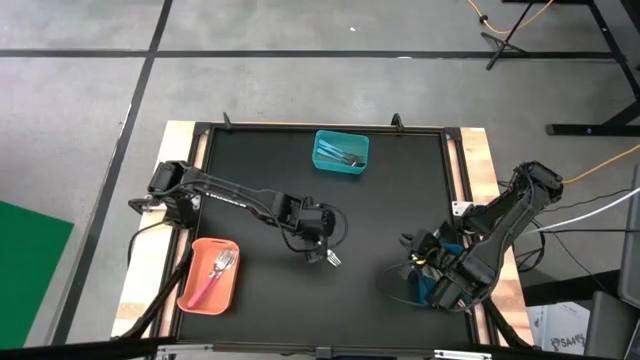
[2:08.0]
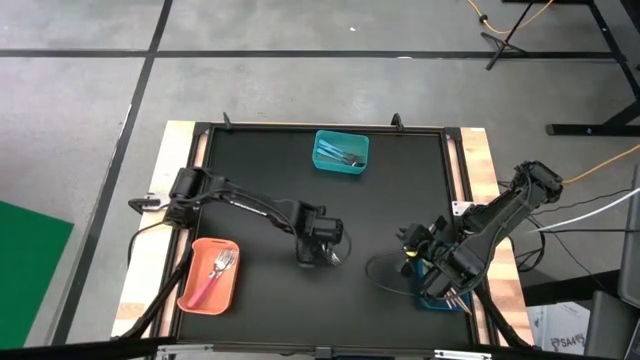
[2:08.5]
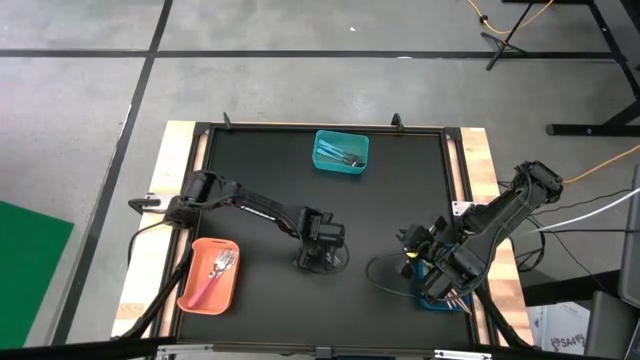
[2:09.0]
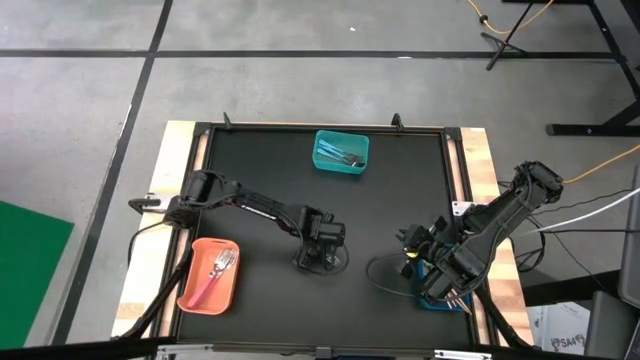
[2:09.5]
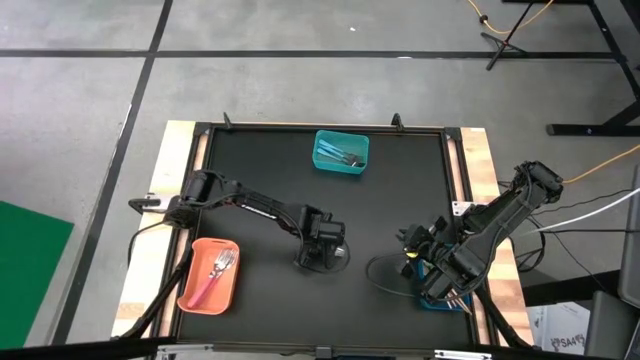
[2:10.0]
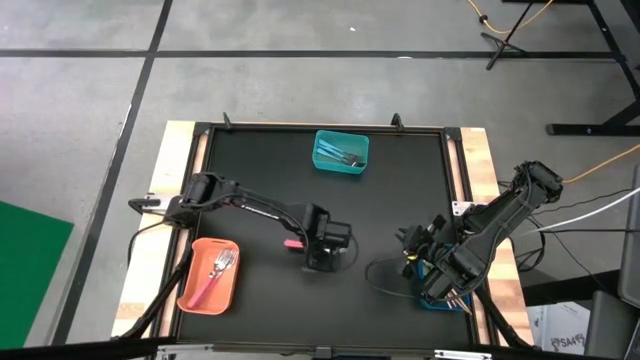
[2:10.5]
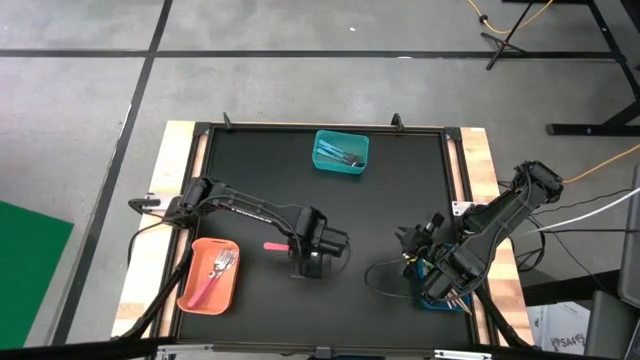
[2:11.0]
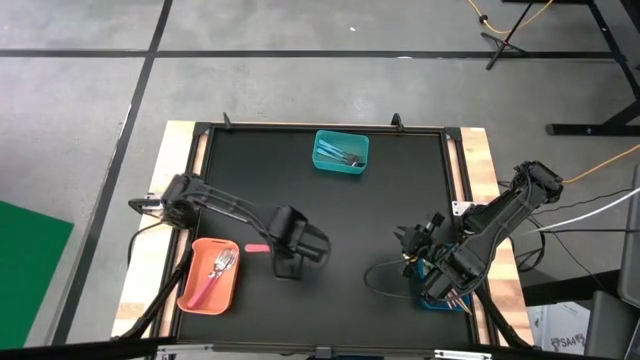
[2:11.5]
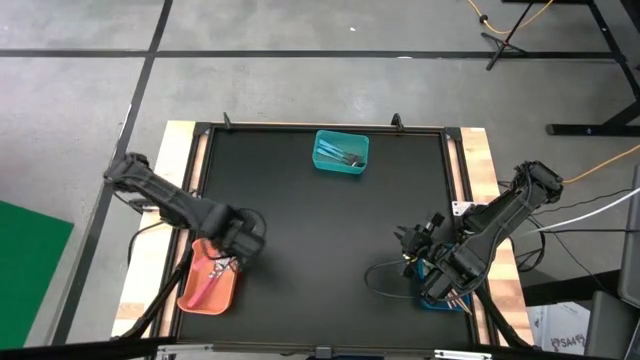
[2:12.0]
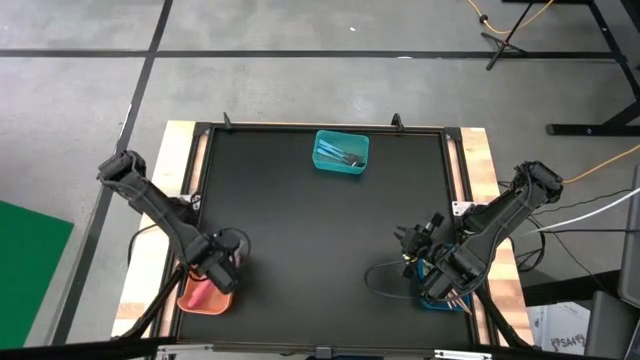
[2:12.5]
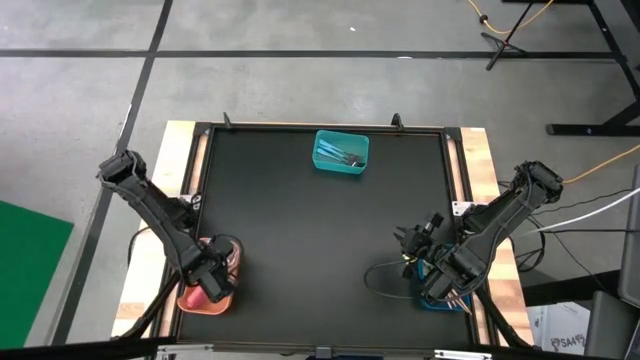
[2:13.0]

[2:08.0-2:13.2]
Task: Sort silverware by color (type)
Put the pink fork into the orange bin

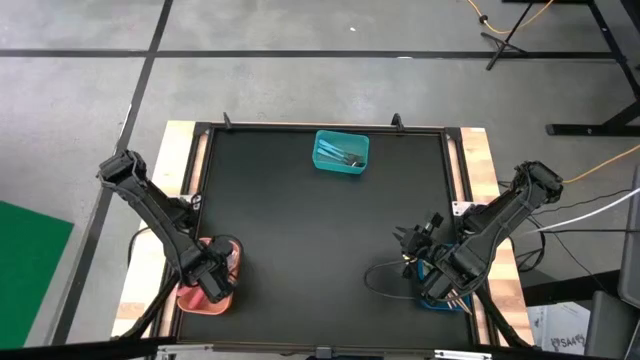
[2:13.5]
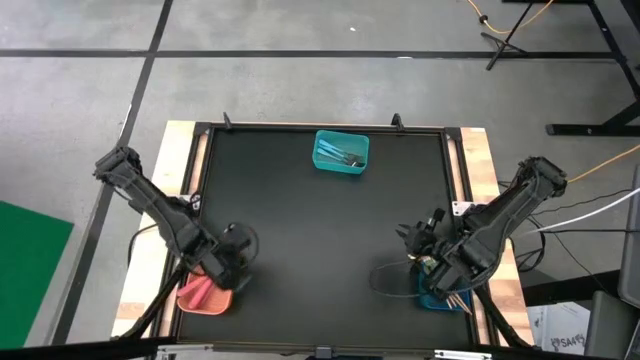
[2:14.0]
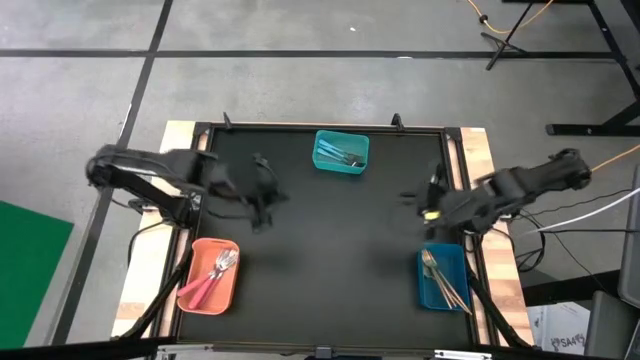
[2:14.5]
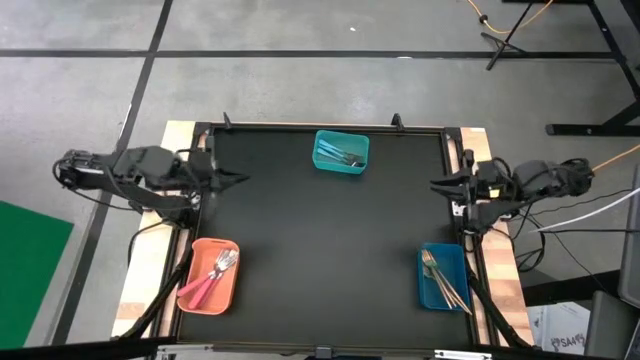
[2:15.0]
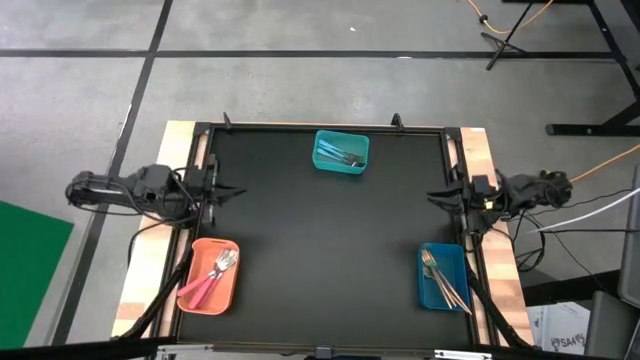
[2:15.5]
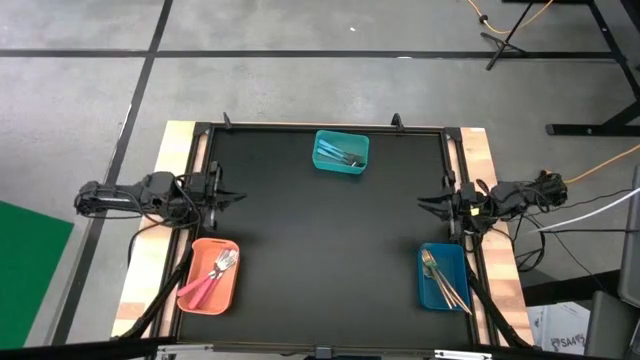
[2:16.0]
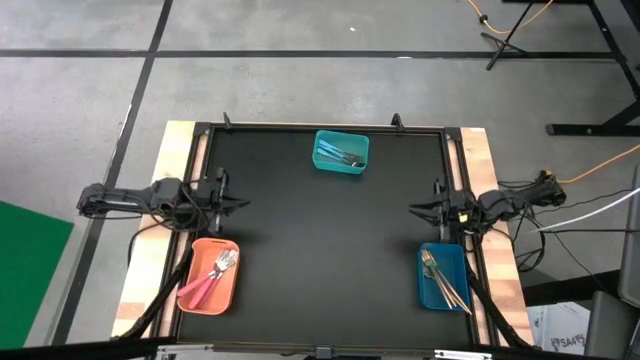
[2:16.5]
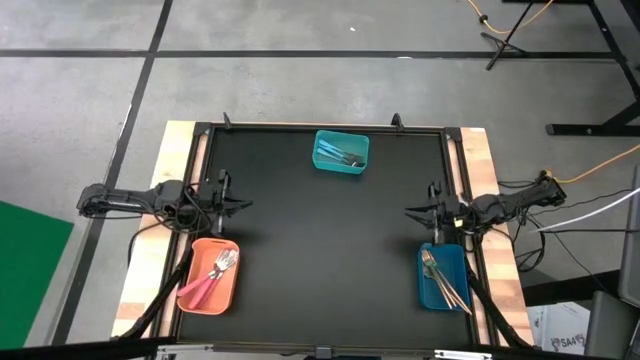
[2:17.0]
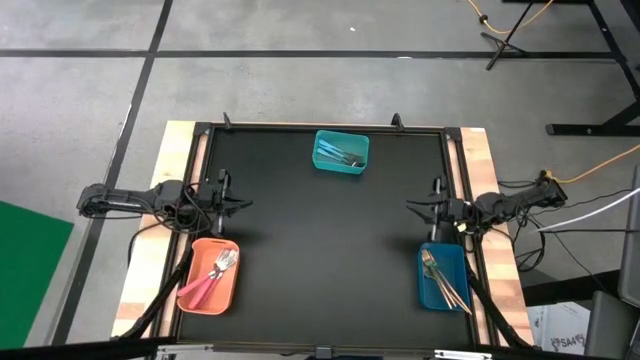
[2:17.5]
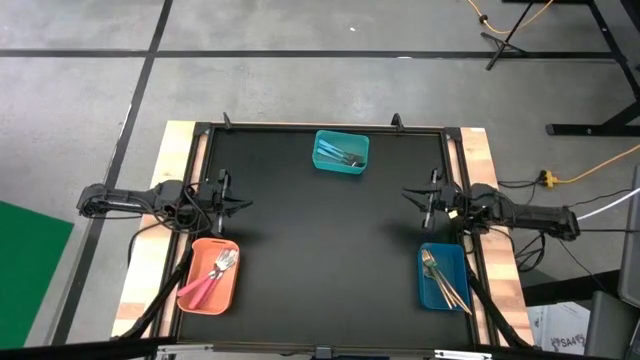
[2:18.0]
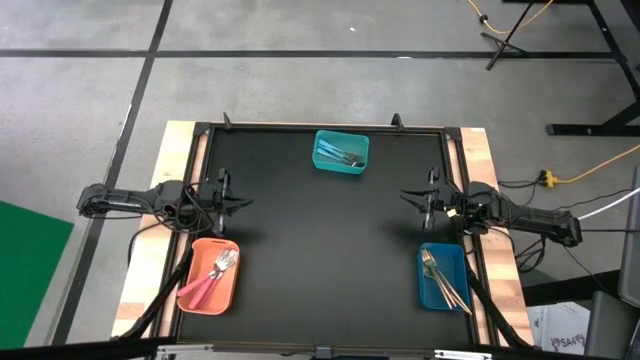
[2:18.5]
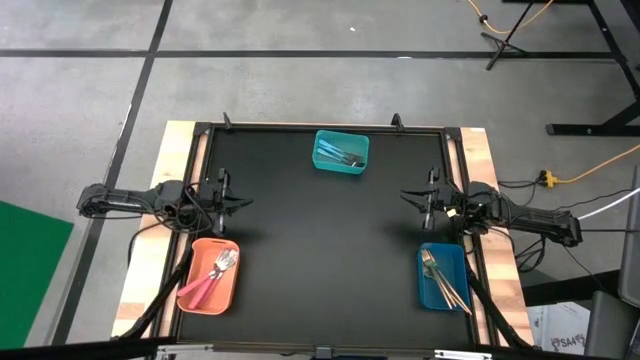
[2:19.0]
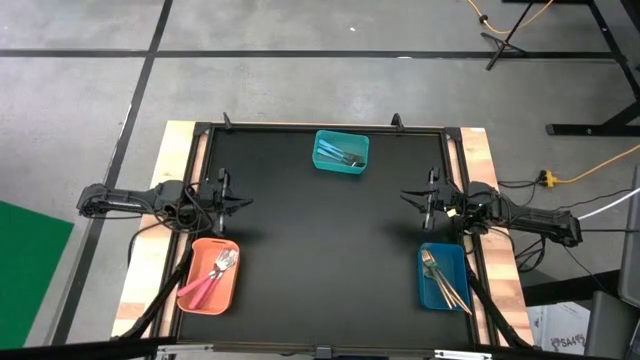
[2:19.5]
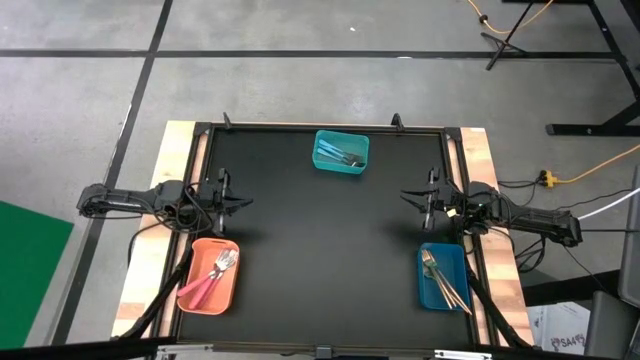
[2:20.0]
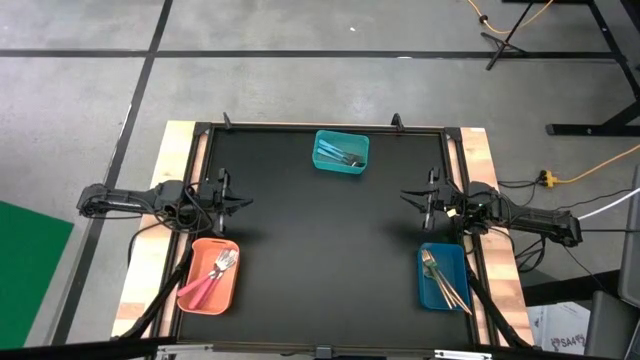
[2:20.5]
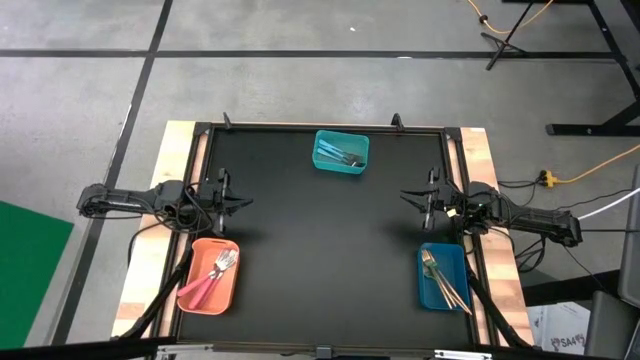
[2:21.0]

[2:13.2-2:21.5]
Return to Home Position

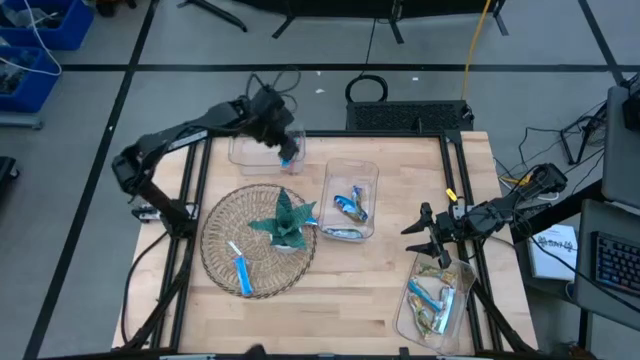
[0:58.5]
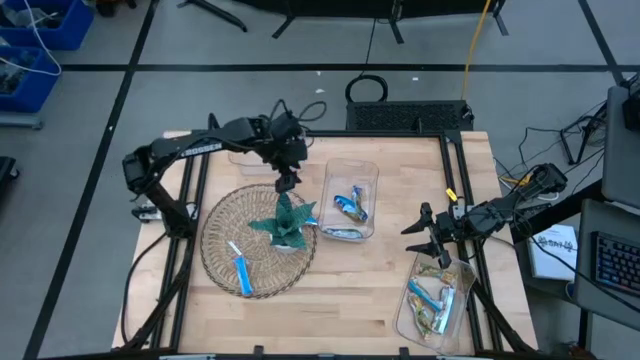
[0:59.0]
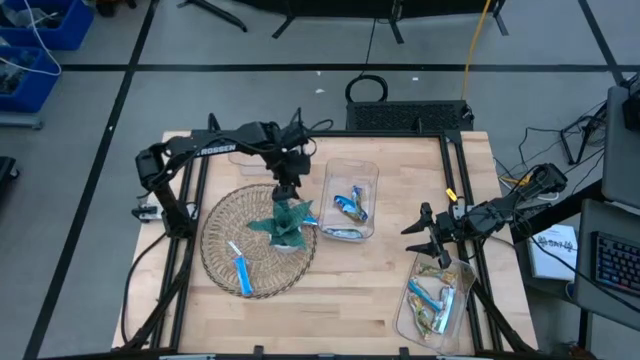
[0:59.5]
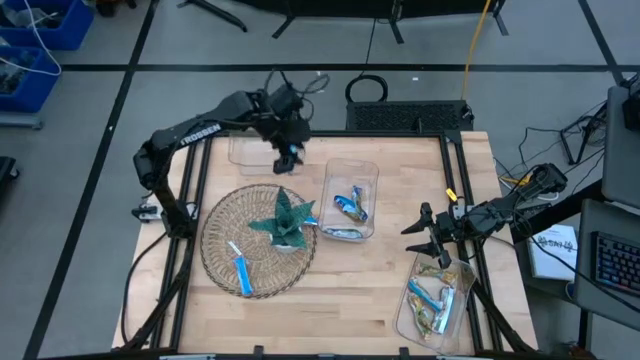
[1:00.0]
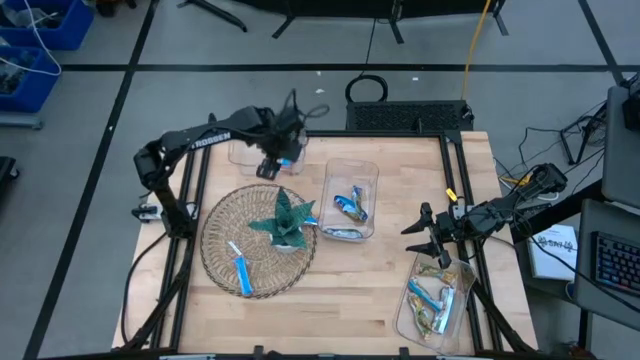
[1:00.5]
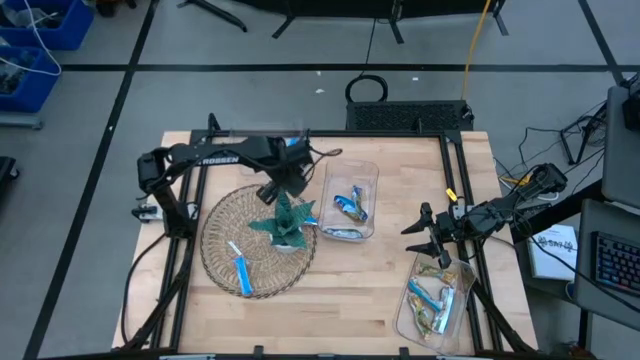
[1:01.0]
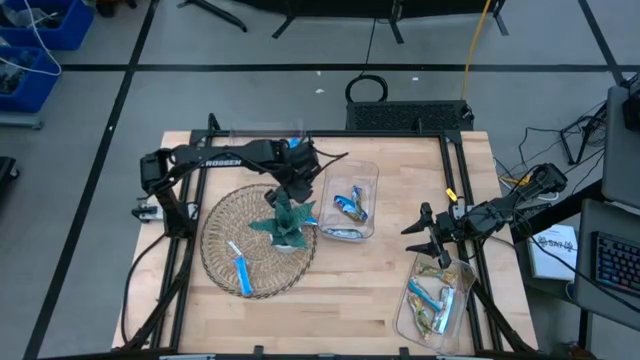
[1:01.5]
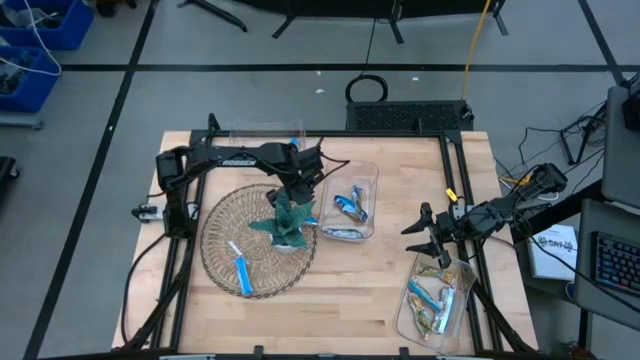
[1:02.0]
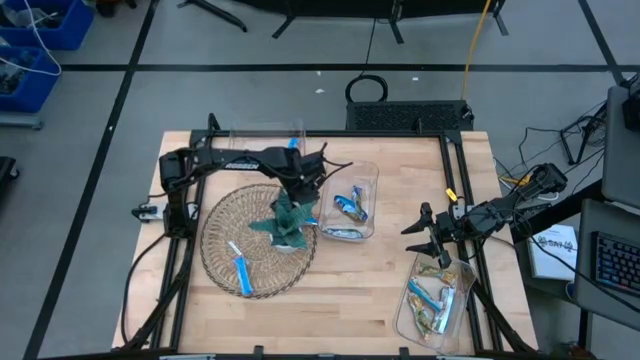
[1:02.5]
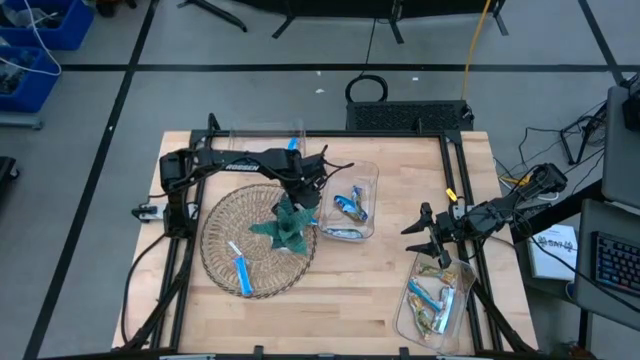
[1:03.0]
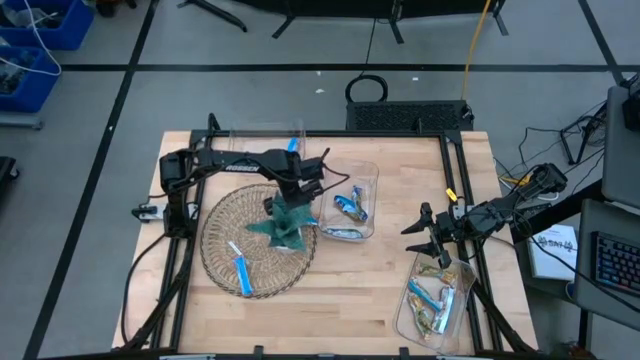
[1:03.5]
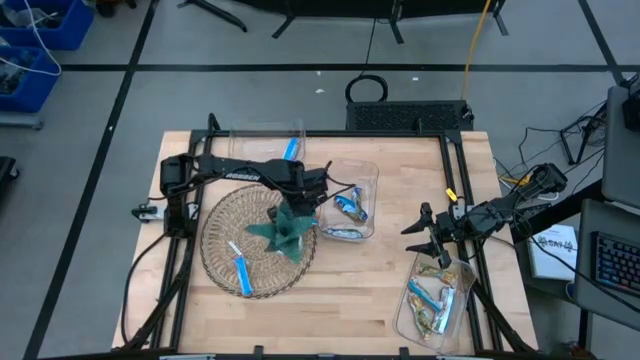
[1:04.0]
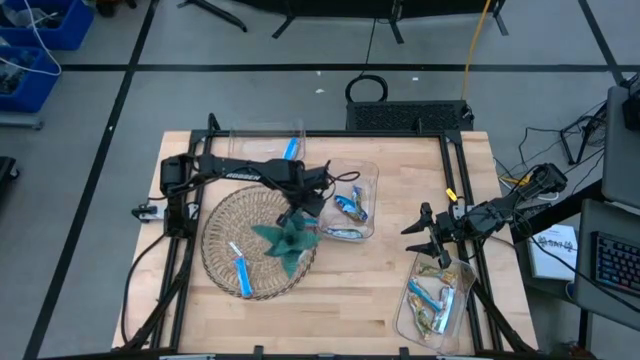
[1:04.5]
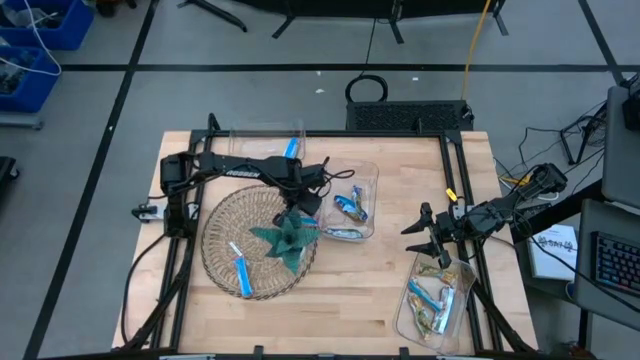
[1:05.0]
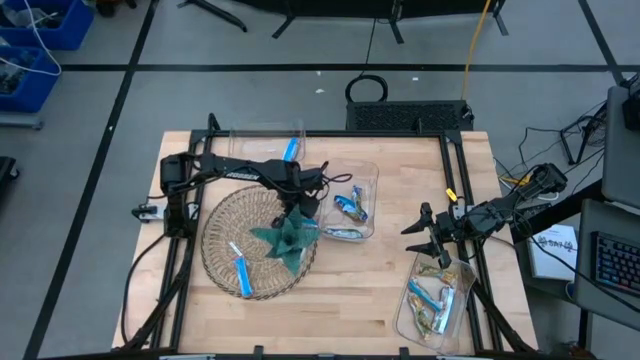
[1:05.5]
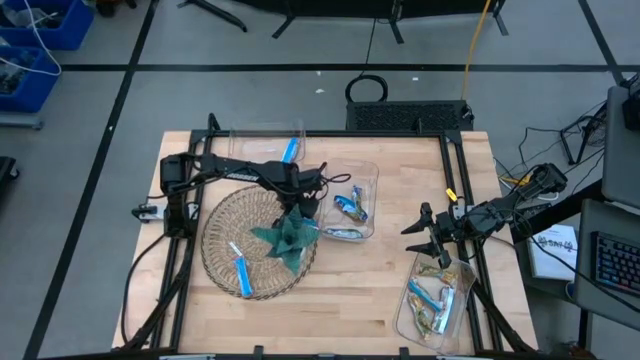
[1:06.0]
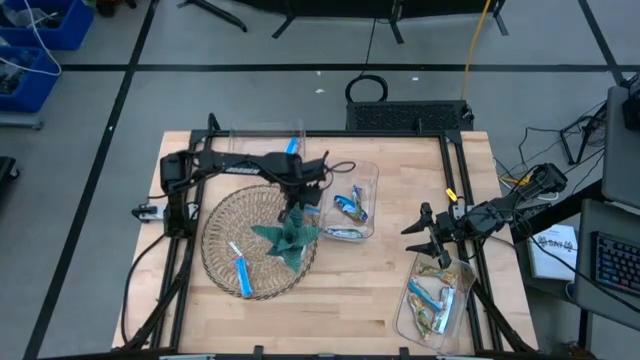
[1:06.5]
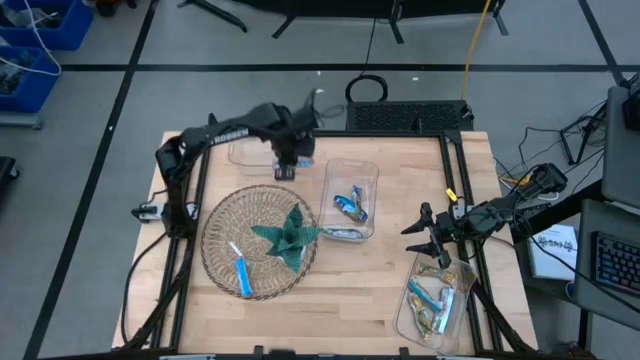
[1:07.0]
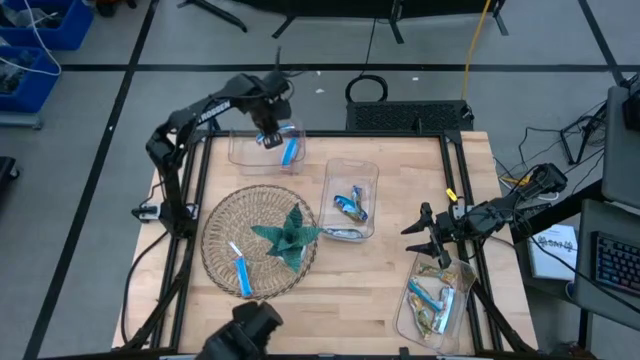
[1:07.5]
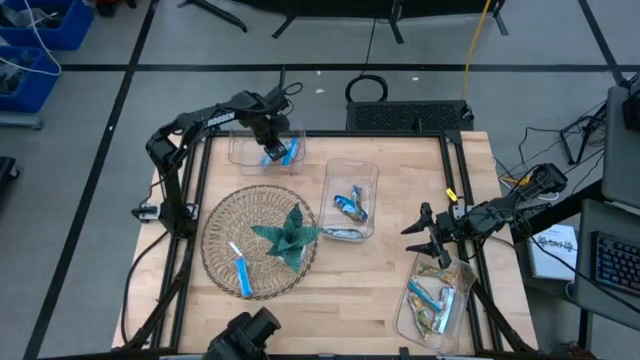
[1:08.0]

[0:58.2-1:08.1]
Task: Pick and place Granola Bars by type
Put the red granola bar into the top transparent bin
